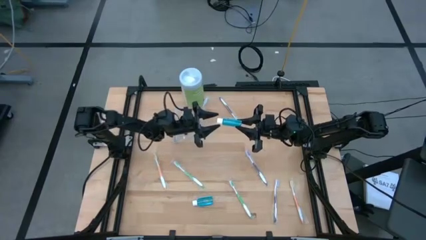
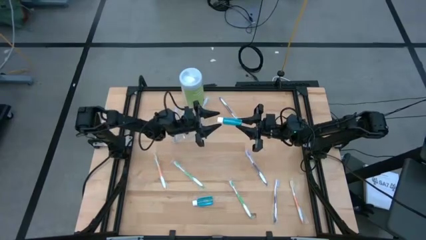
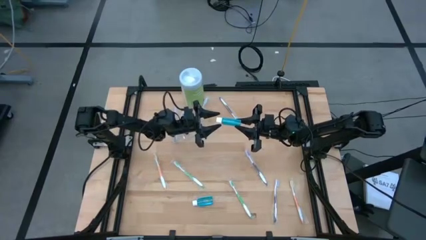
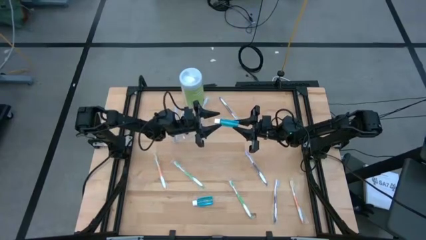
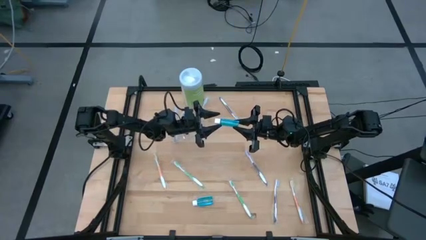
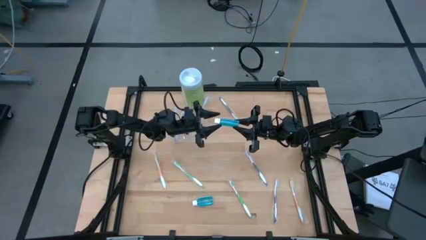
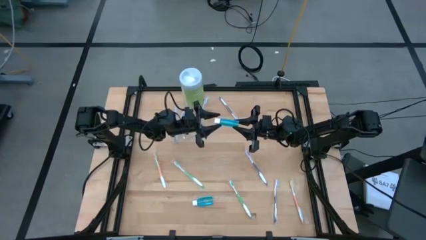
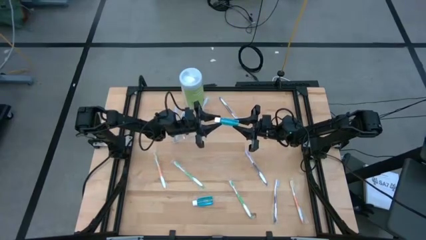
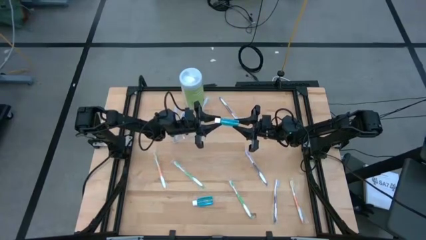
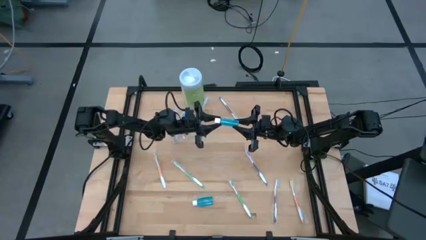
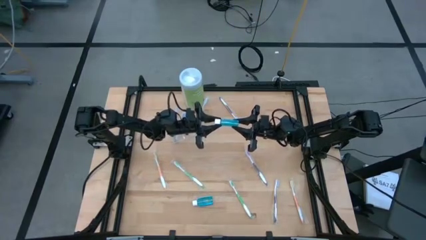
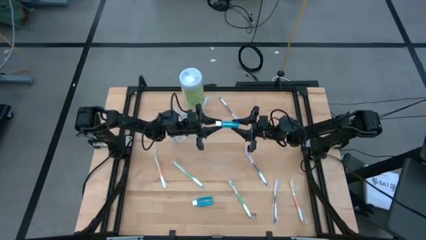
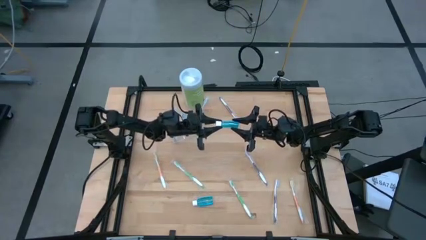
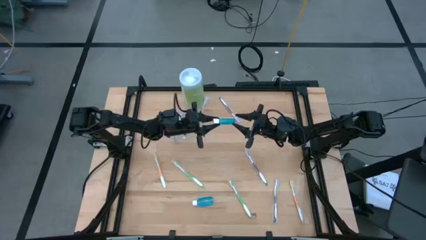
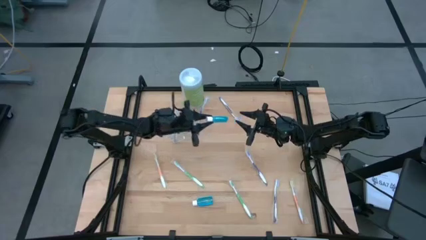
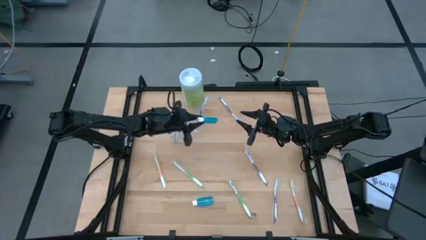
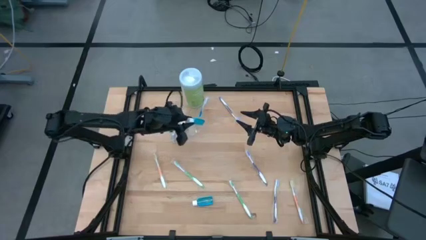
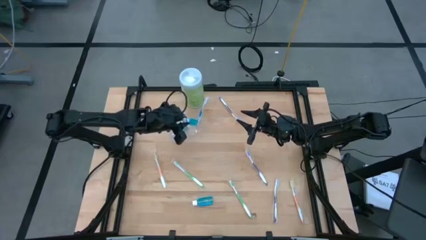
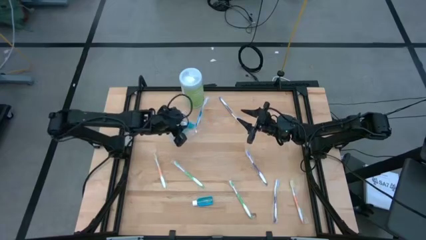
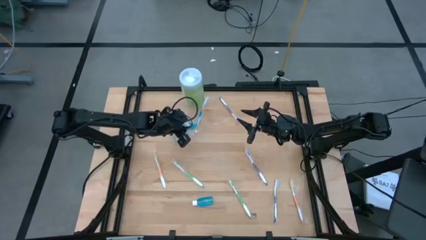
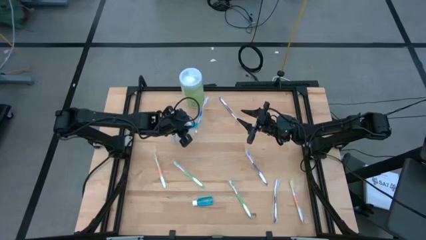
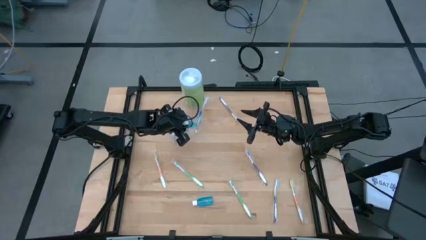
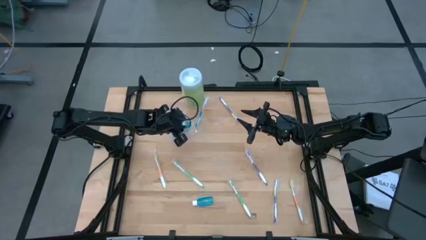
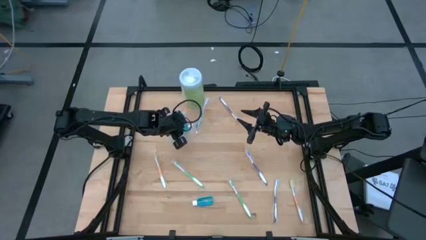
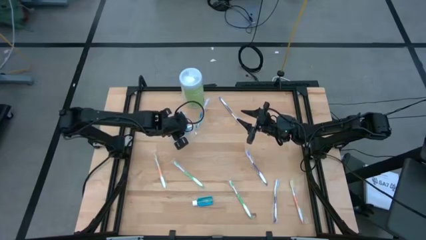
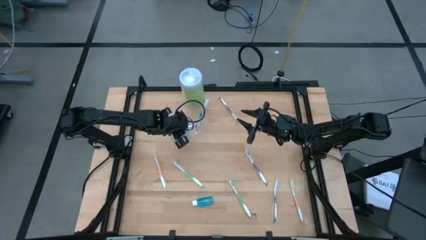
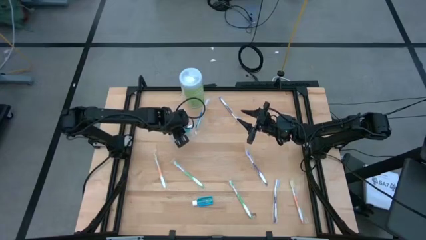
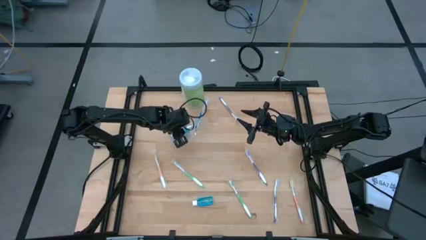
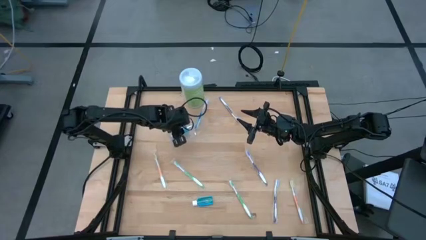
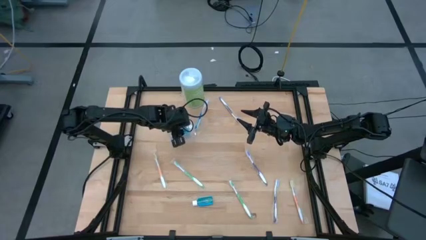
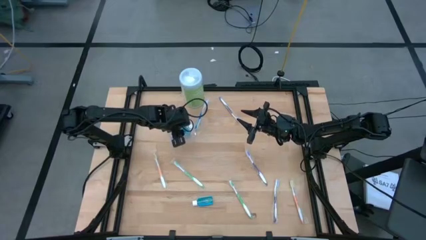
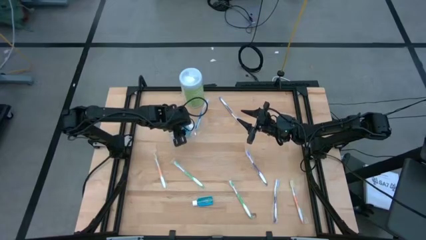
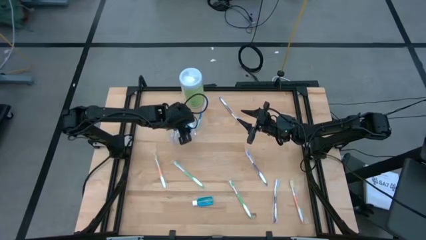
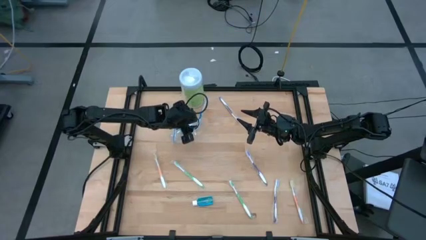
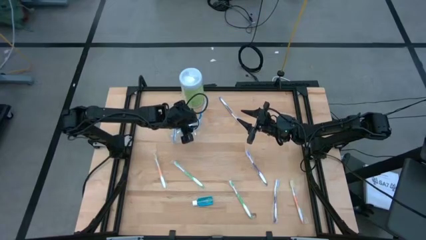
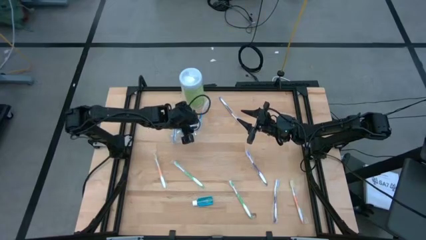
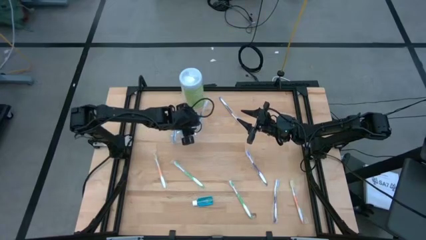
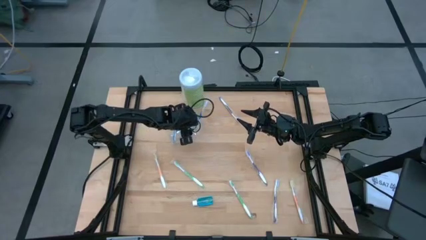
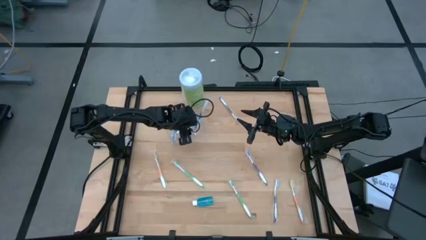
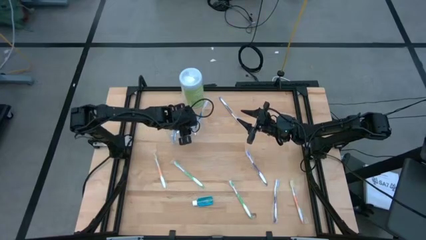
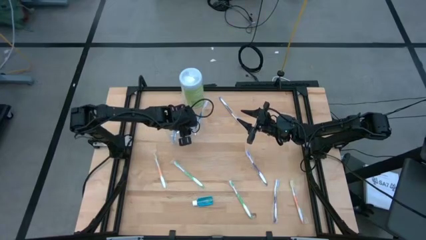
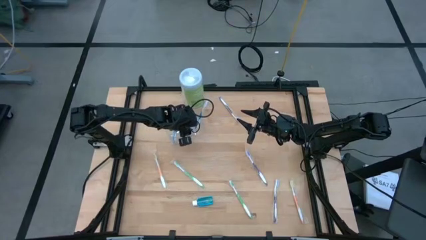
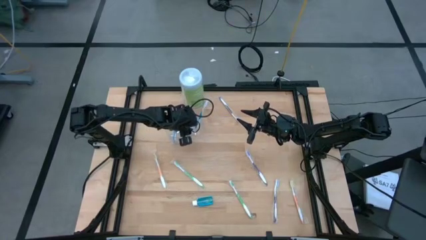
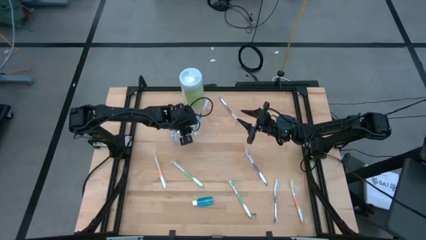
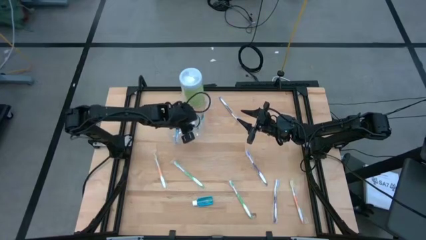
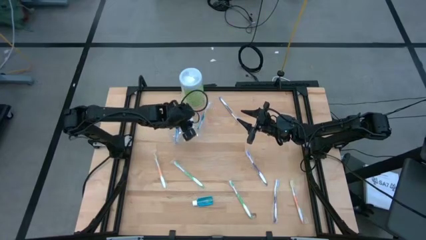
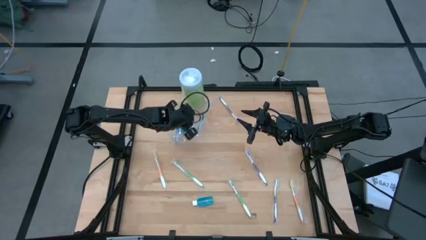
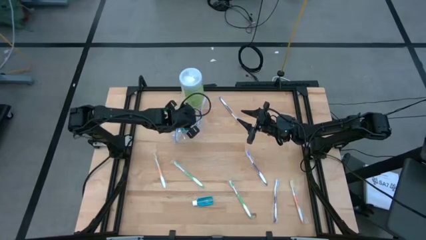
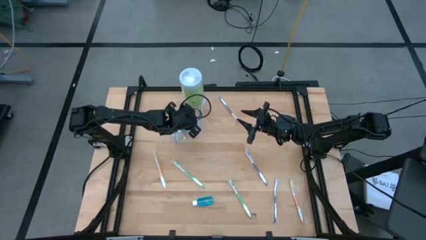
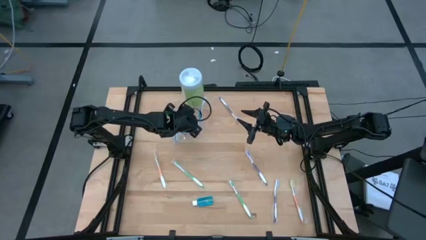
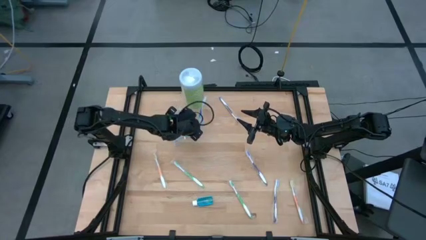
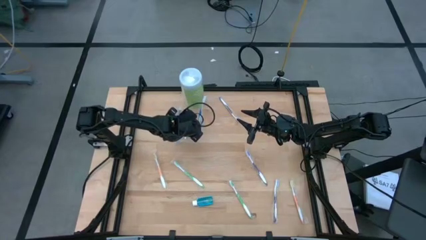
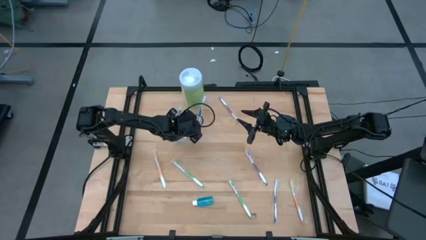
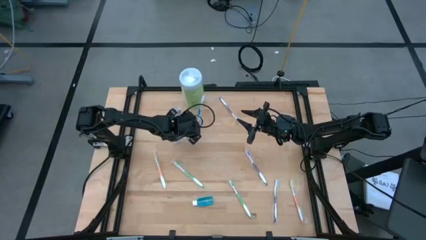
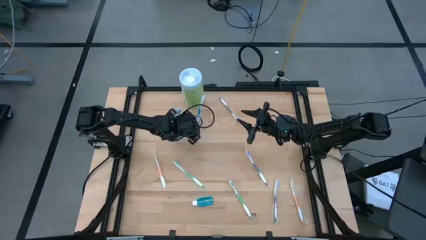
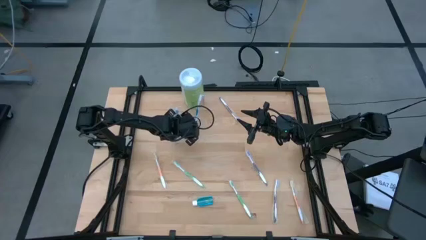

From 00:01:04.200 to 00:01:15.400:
Task: Pick & Place toothbrushing station
Put the left mouthwash into the transparent organizer

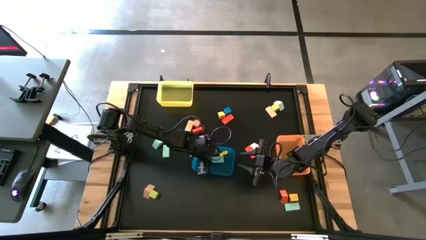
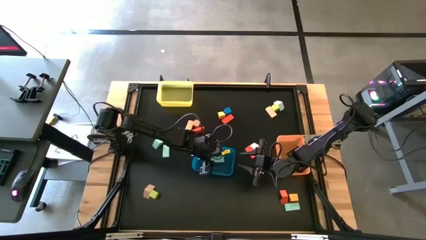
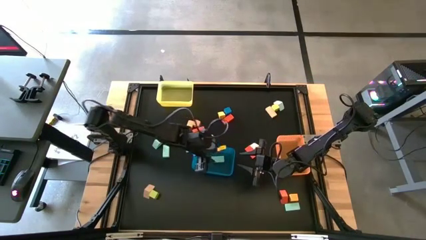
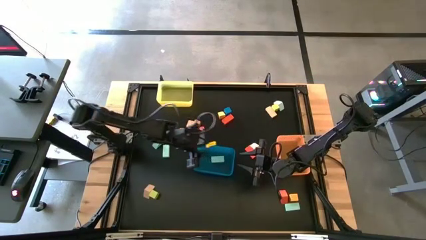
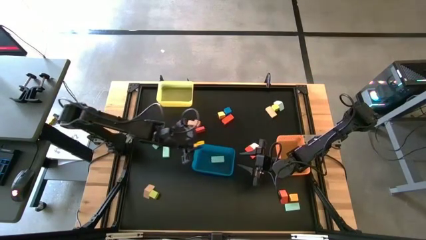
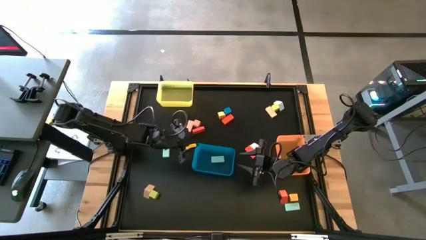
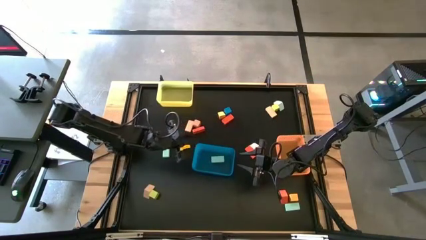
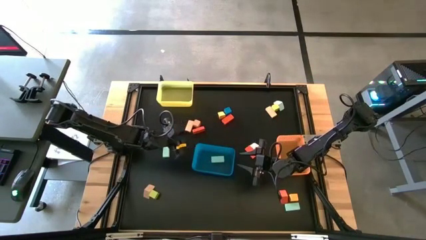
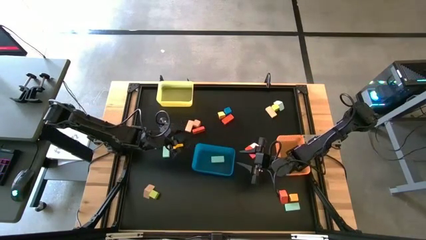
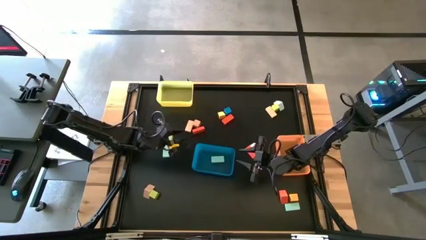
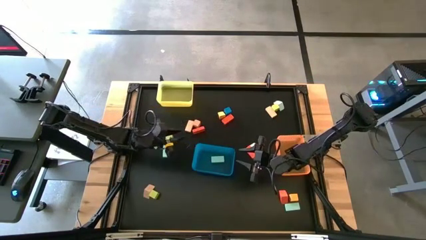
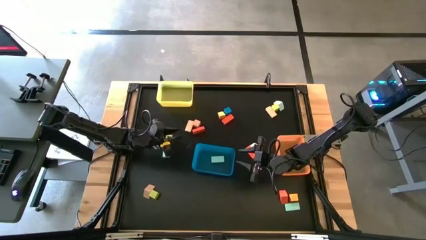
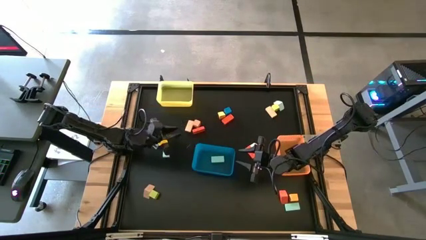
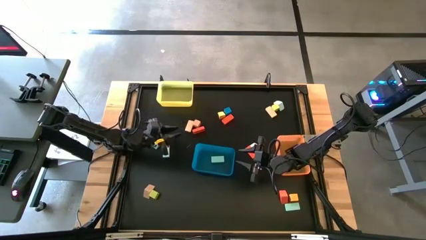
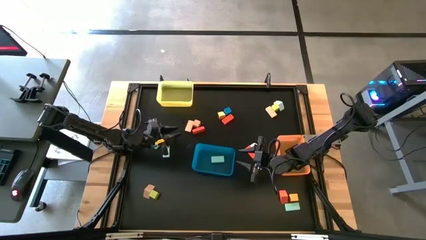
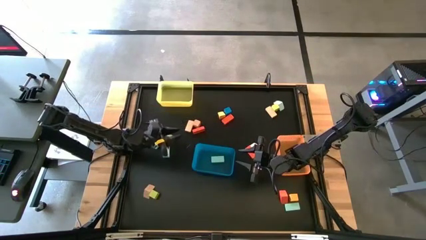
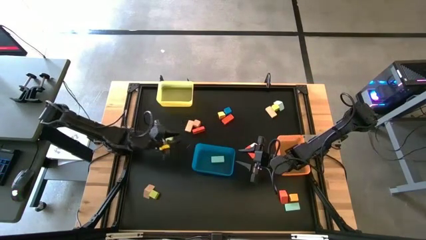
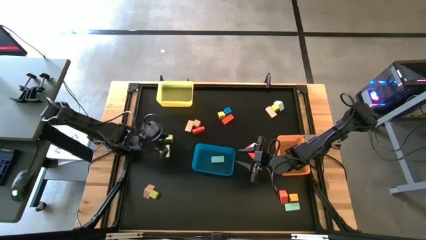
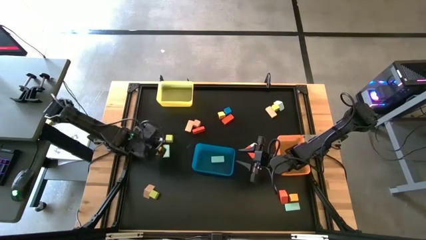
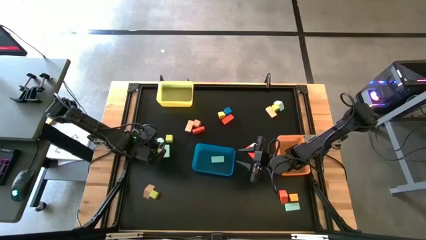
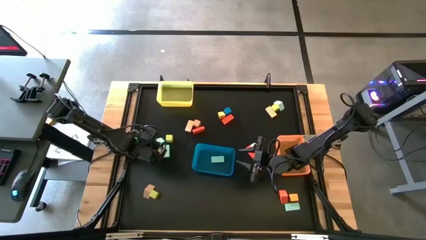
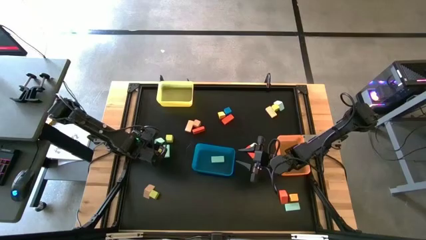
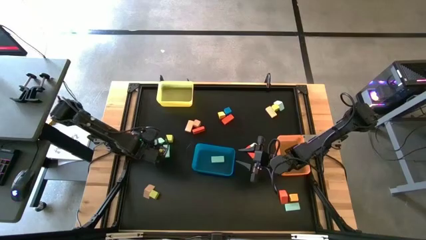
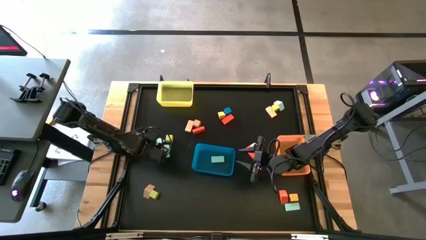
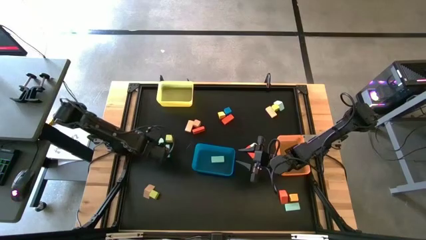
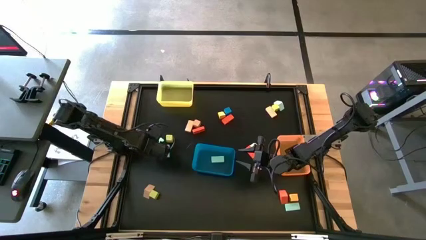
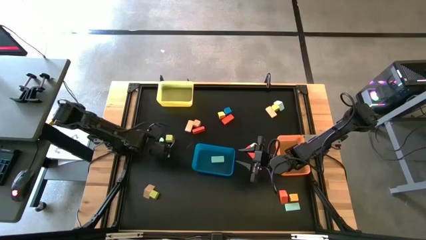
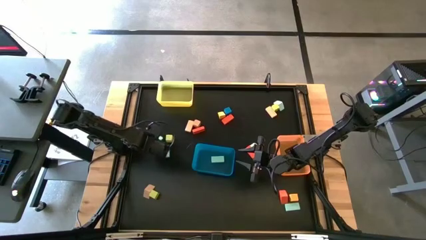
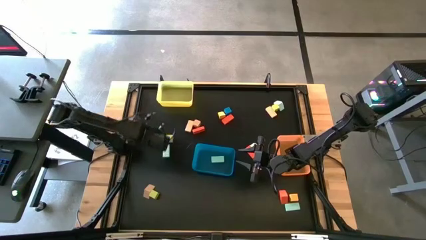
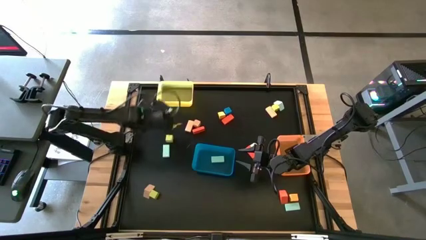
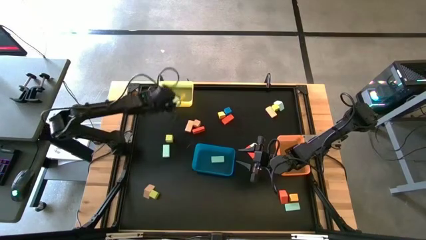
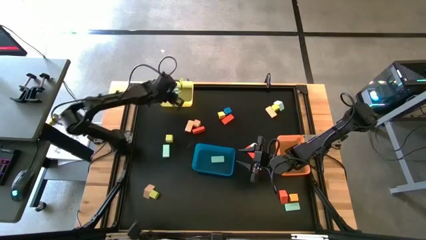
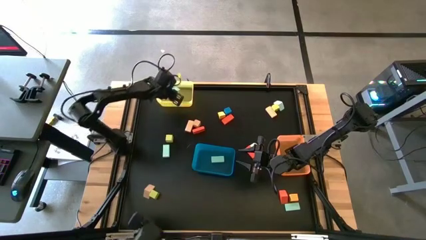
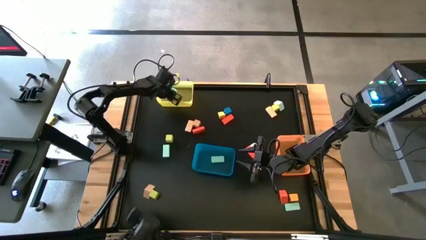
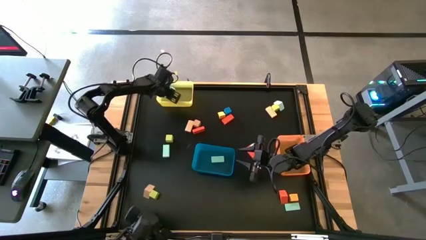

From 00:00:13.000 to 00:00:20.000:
Task: Sort blocks by size
Put the light blue triangular block into the yellow bin
